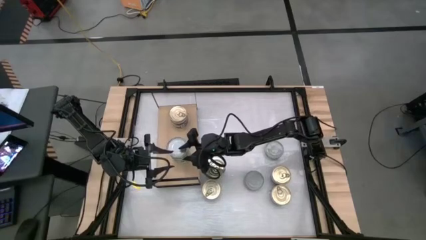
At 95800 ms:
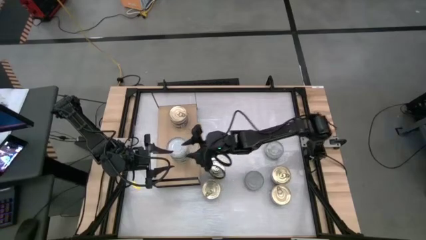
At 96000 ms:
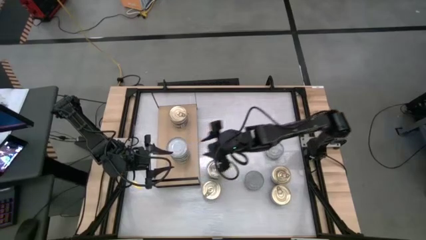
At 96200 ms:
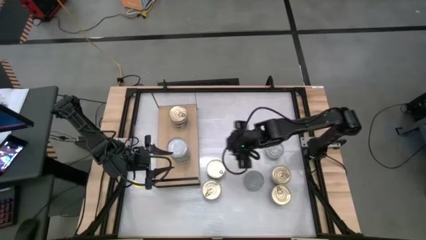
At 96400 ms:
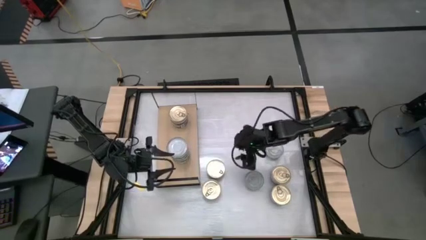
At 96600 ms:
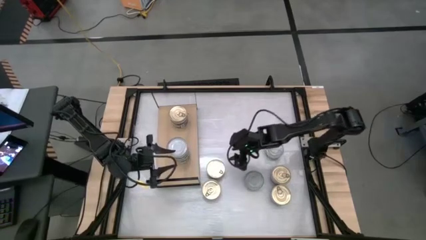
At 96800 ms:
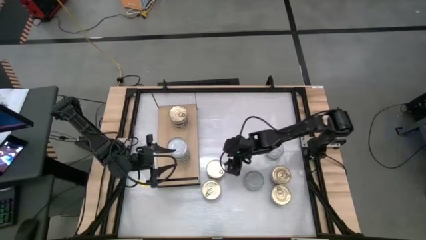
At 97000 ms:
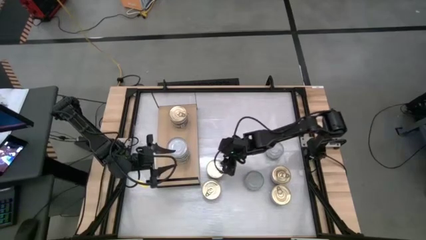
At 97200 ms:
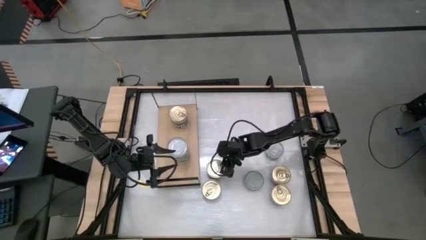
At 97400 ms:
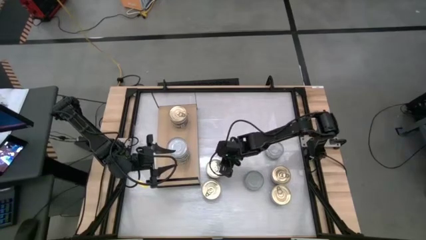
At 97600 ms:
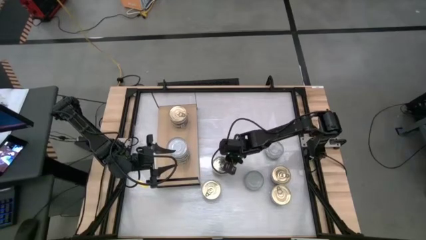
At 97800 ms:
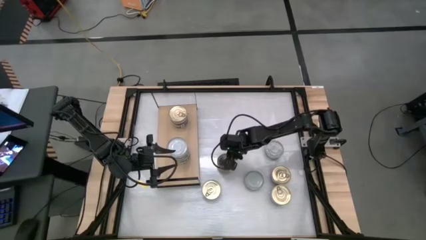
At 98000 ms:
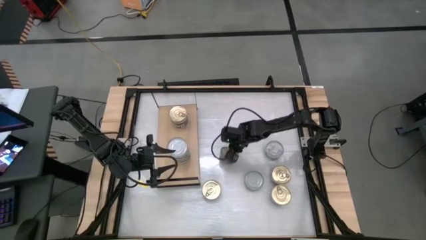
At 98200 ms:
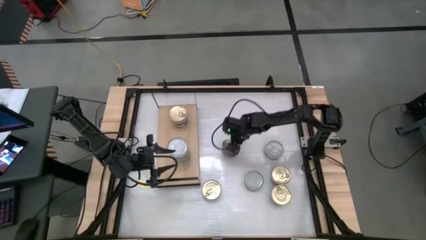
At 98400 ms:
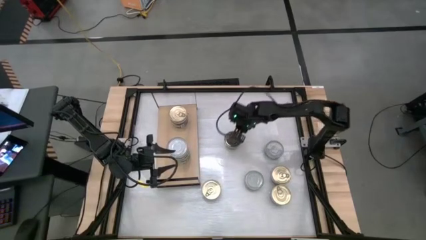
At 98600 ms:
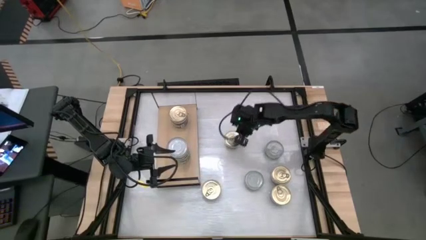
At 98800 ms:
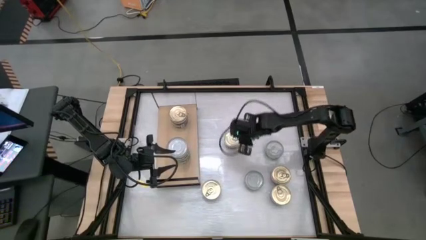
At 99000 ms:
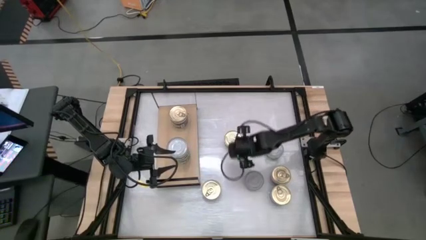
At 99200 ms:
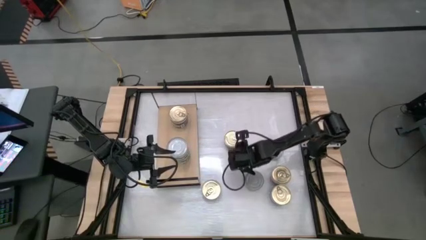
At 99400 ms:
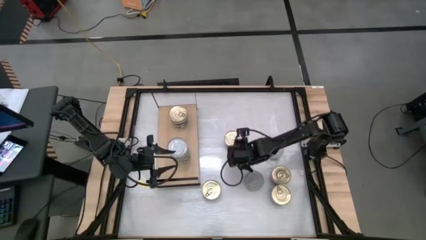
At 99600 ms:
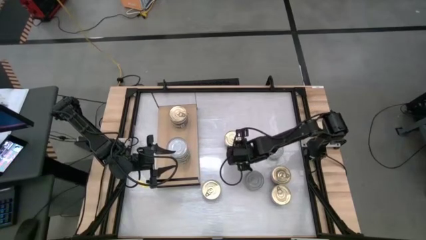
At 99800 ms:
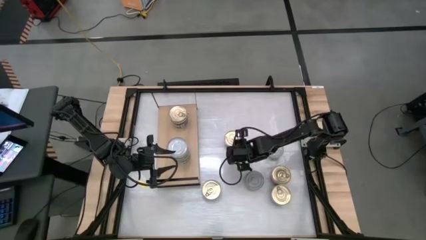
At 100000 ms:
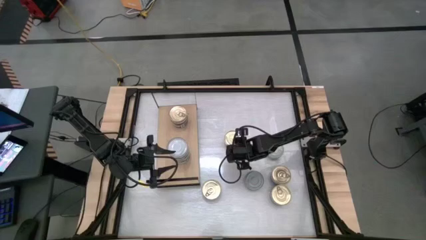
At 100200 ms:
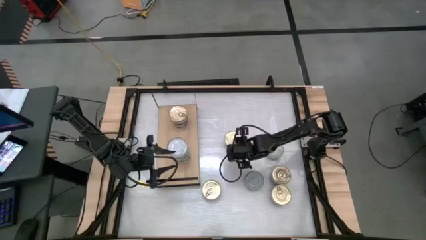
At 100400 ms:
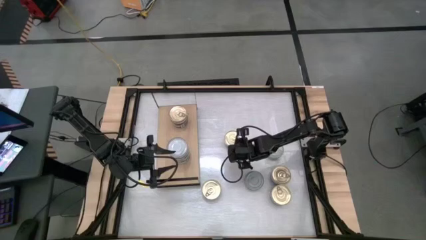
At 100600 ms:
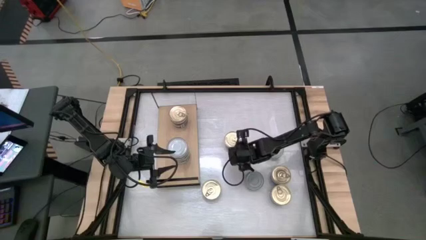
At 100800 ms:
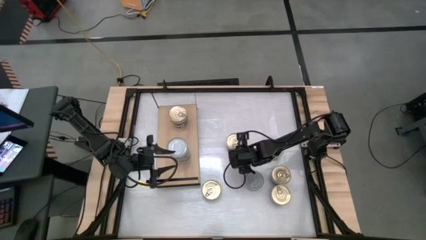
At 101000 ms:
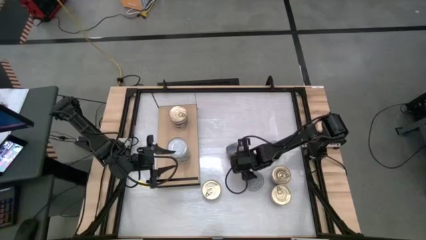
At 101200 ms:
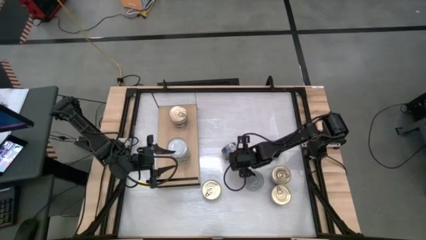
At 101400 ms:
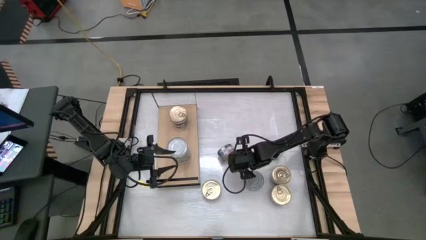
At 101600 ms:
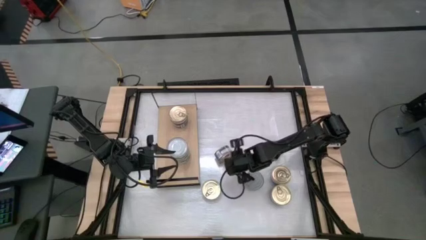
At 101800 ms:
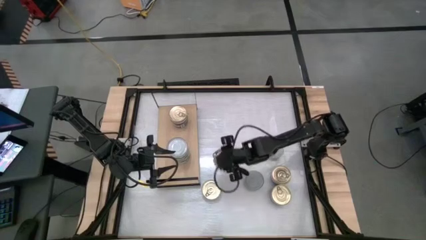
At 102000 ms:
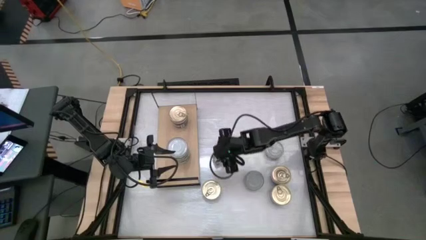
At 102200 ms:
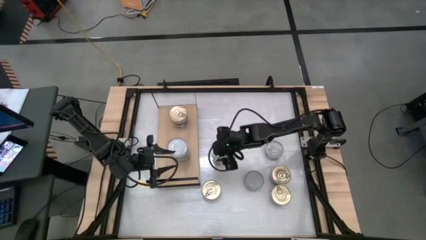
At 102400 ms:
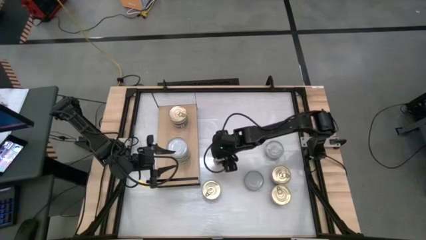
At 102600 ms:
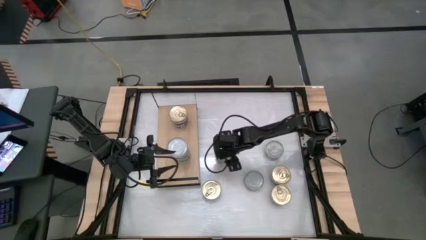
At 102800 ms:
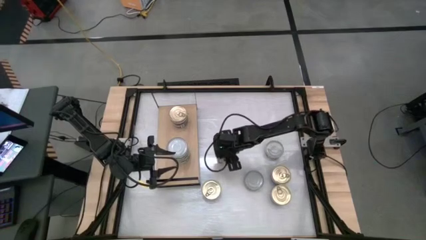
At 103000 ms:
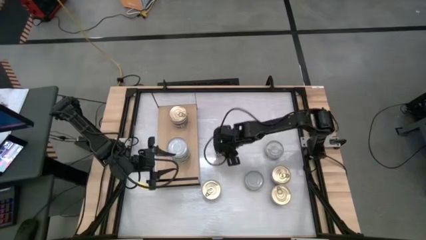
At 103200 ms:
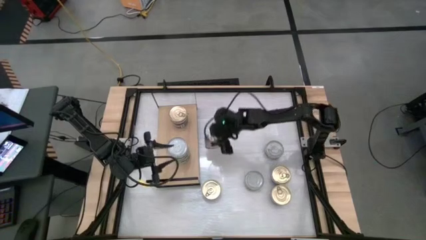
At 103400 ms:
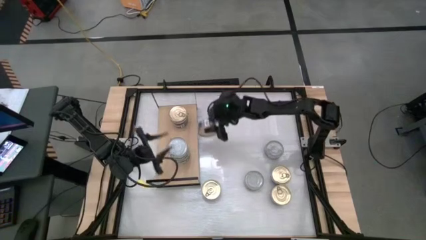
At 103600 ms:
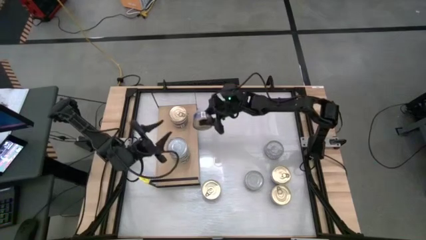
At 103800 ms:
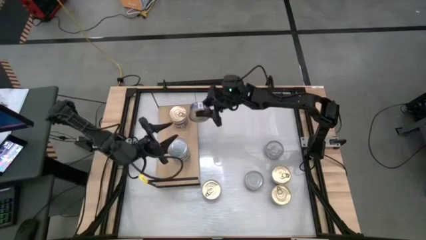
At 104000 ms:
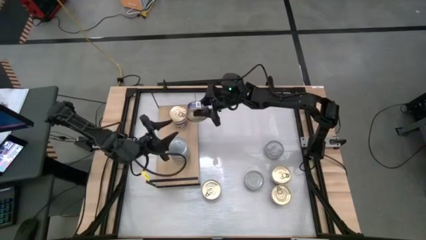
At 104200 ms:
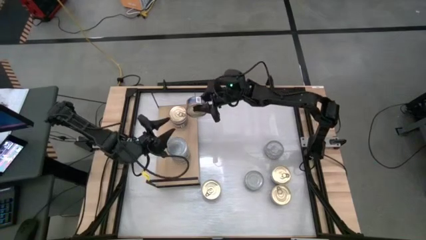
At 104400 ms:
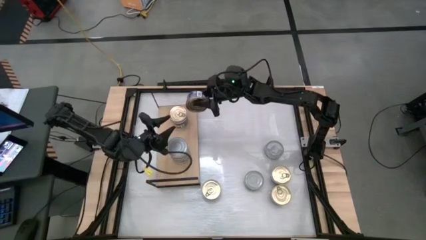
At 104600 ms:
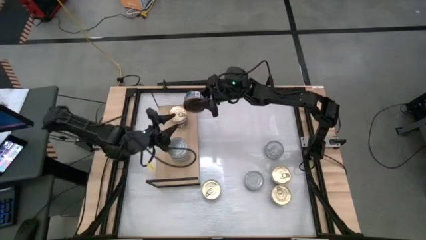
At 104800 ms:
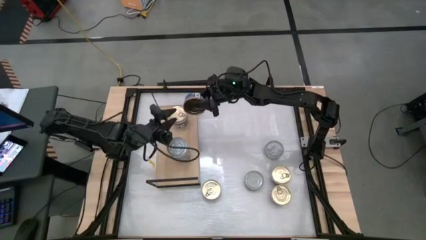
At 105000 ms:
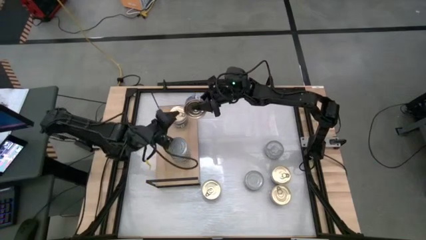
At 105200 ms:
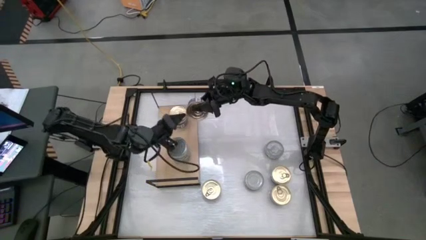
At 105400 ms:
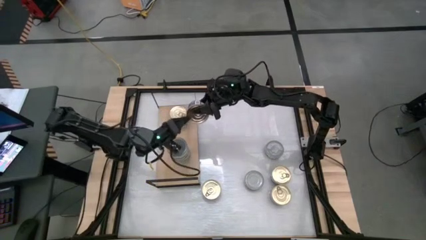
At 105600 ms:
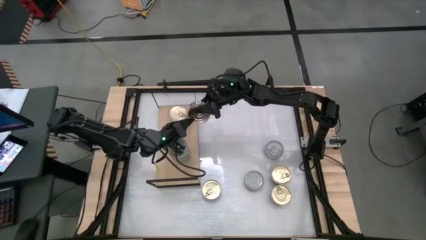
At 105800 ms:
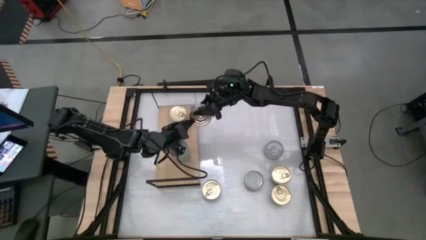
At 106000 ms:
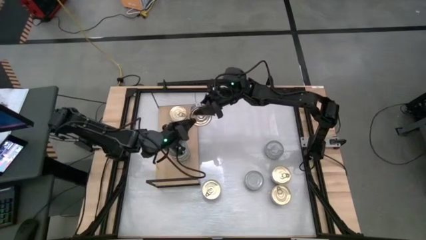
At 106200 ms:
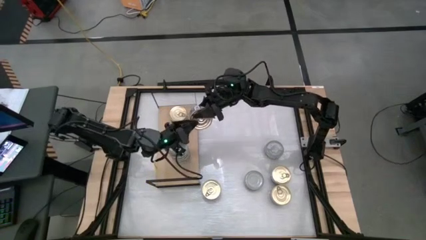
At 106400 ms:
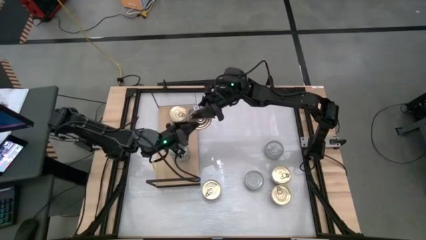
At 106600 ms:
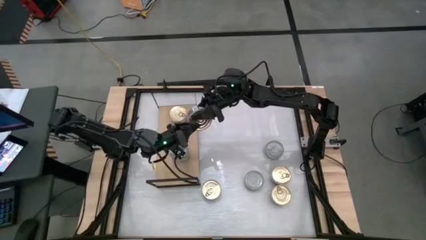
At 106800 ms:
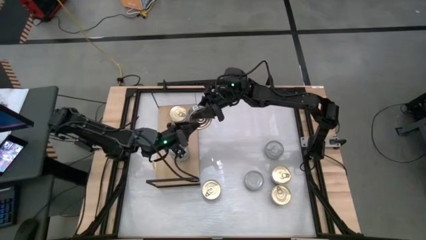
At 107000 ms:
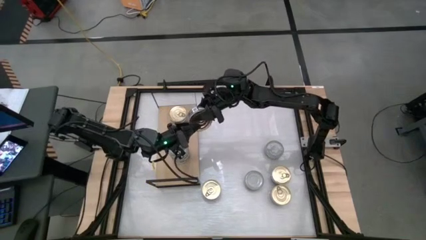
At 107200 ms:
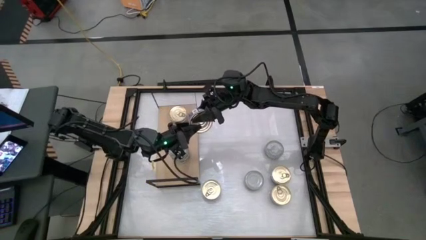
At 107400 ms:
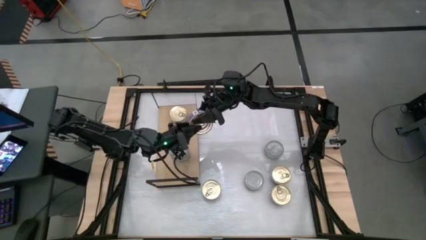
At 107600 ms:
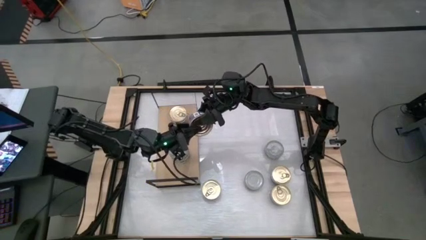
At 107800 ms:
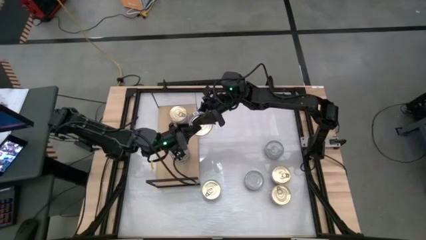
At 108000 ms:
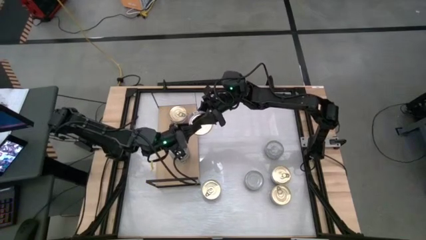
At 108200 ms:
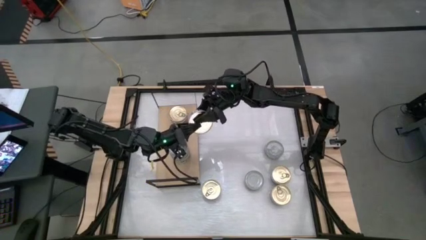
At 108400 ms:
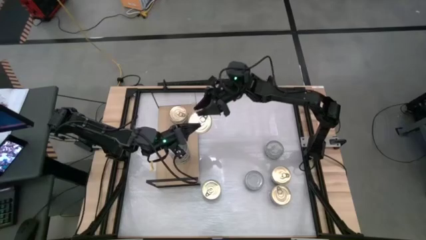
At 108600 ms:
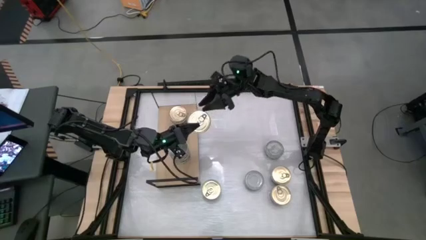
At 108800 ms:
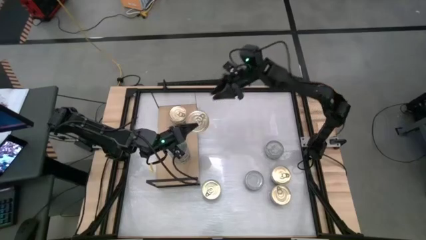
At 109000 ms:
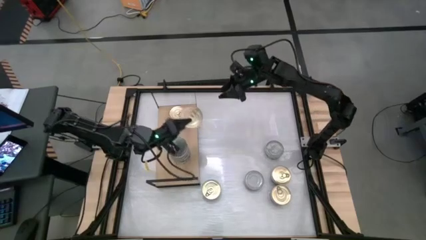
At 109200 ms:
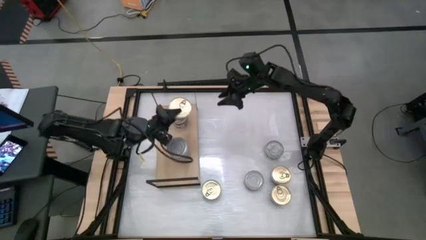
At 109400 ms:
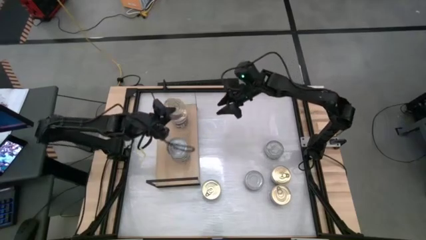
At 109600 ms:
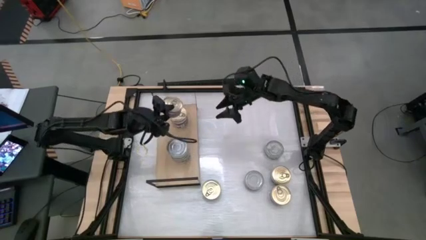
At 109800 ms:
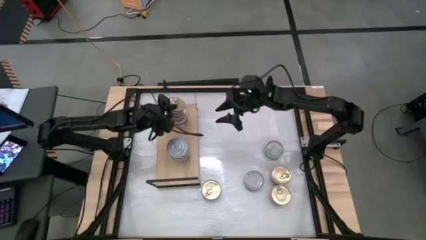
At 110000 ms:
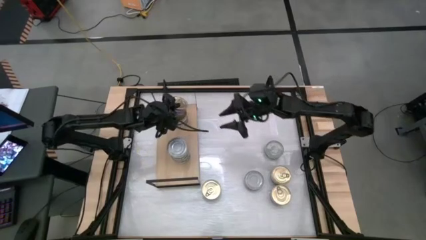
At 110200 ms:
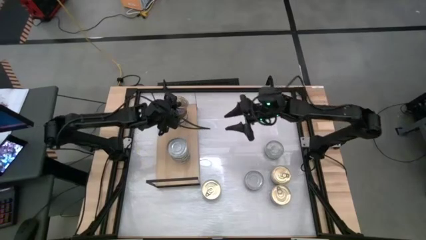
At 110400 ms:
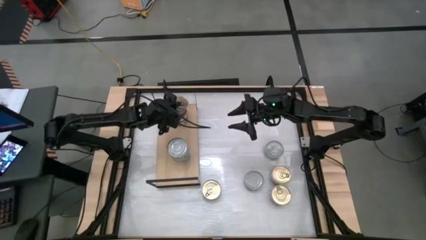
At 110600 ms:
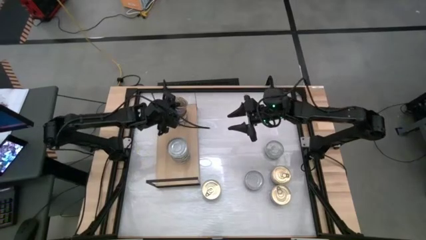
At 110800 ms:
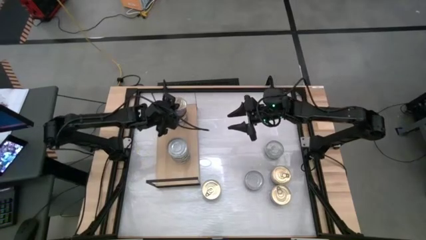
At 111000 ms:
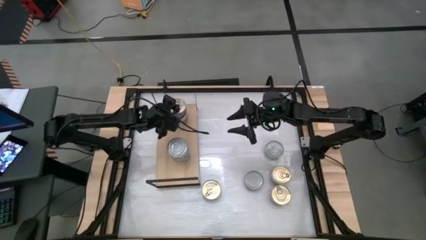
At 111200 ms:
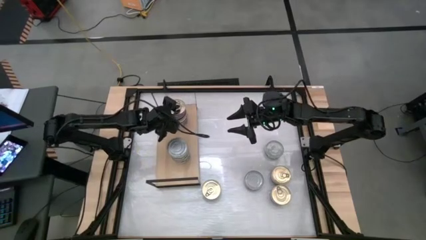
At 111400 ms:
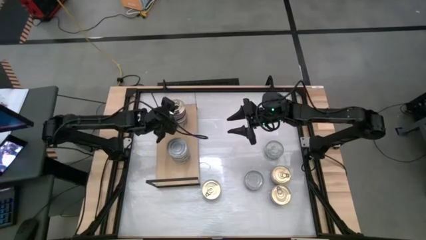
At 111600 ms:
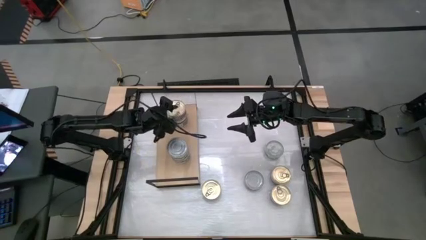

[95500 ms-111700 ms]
Task: Stack canned seafood by type on shelf
Stack the blue-pink tuna can on top of the other blue-pink tuna can on the shelf

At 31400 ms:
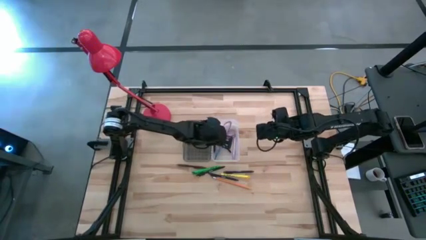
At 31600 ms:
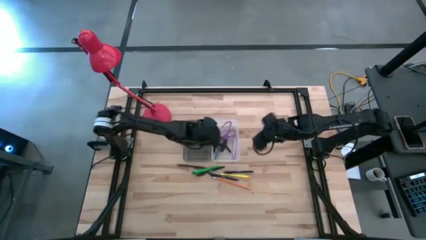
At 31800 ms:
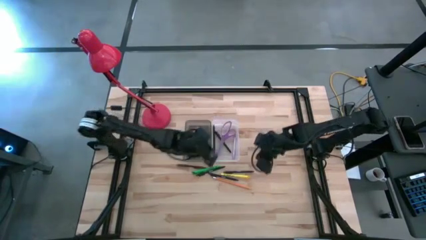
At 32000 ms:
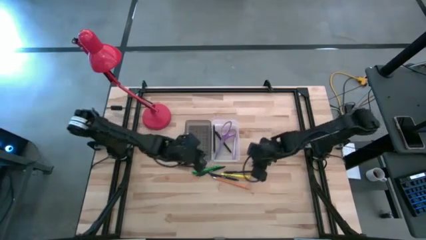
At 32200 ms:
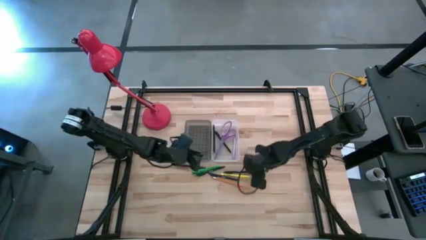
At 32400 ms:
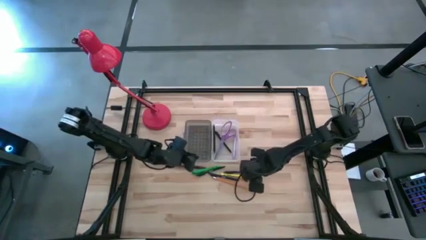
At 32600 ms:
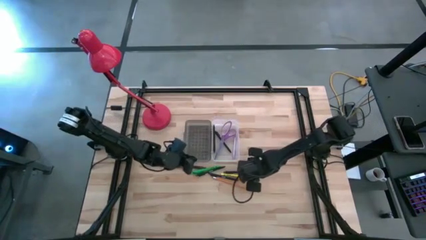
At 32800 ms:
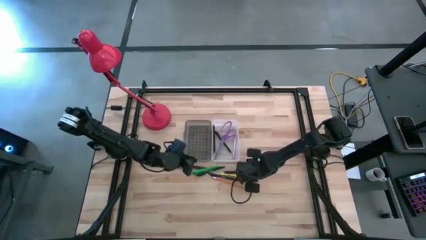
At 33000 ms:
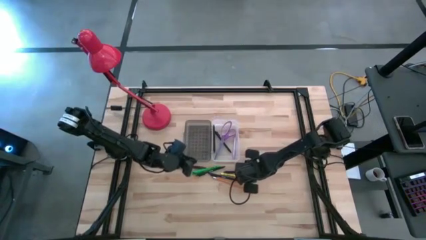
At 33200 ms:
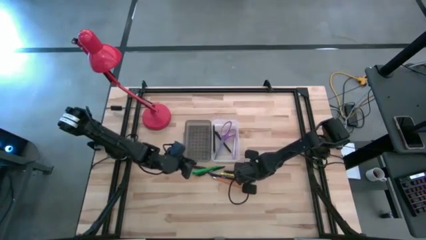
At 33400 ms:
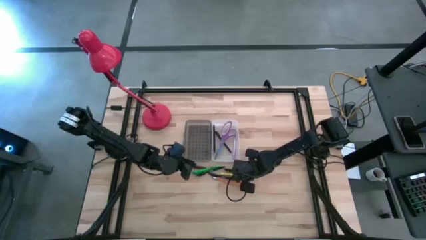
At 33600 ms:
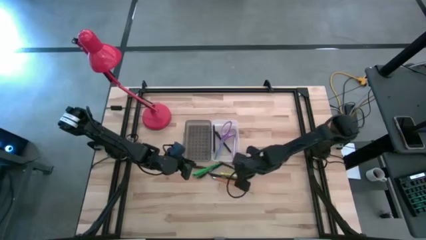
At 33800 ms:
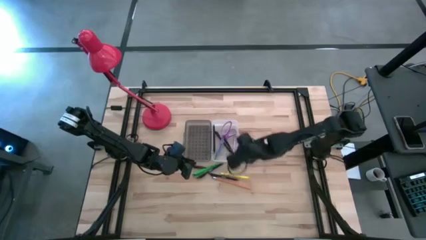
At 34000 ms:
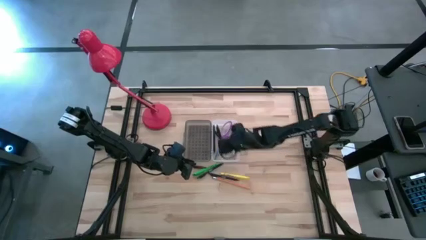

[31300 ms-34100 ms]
Task: Pick & place school supplies into a supply box
Put the middle right black pen into the supply box
